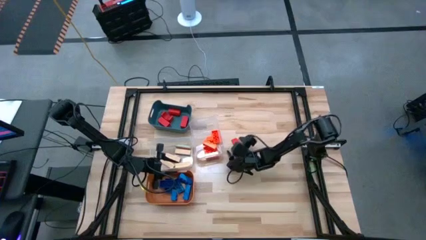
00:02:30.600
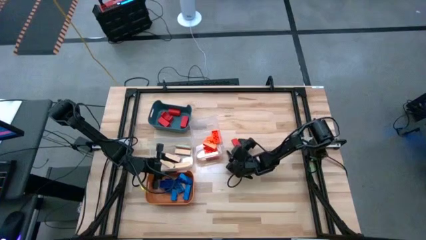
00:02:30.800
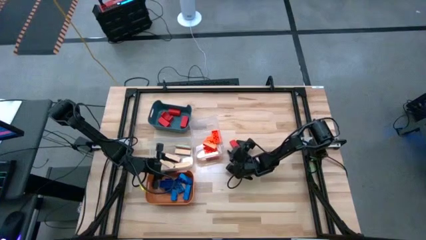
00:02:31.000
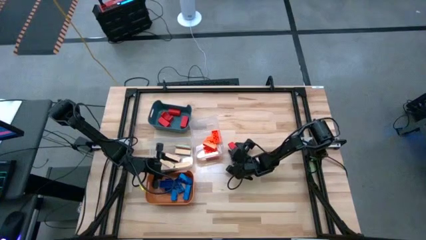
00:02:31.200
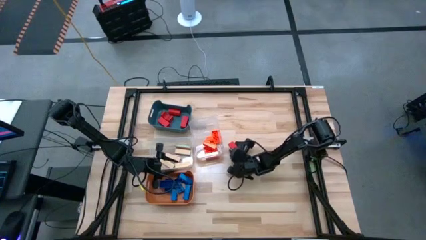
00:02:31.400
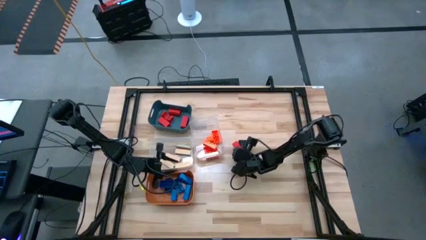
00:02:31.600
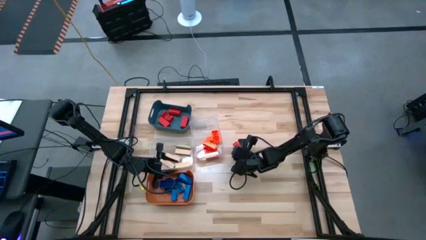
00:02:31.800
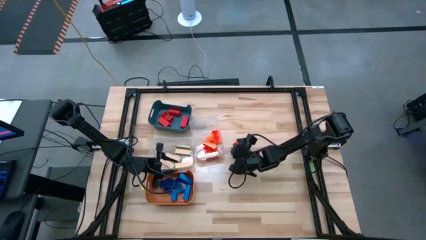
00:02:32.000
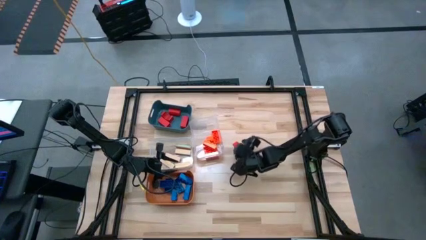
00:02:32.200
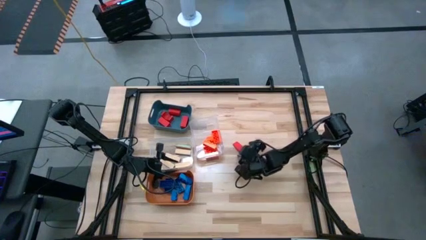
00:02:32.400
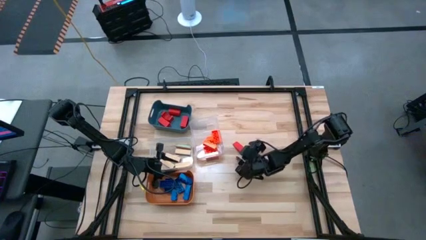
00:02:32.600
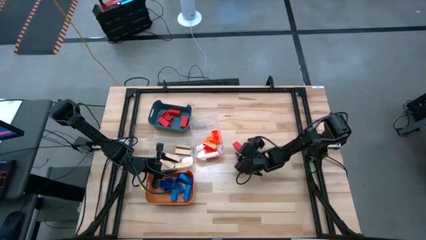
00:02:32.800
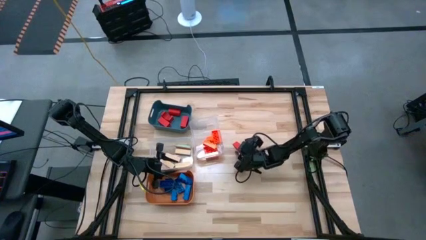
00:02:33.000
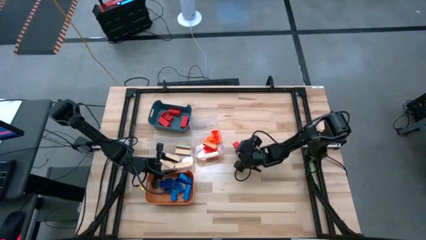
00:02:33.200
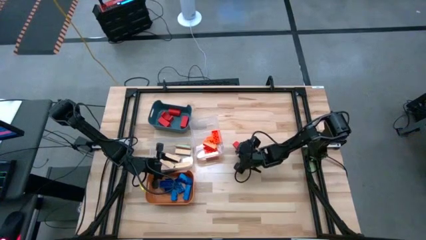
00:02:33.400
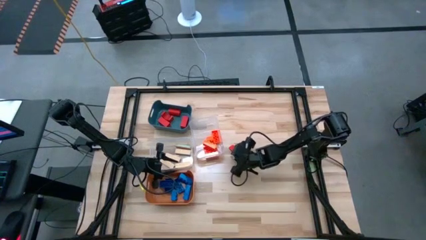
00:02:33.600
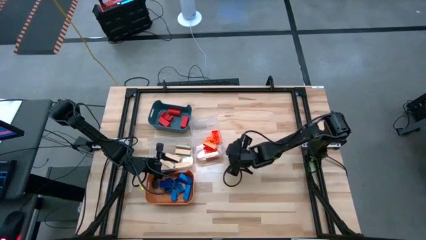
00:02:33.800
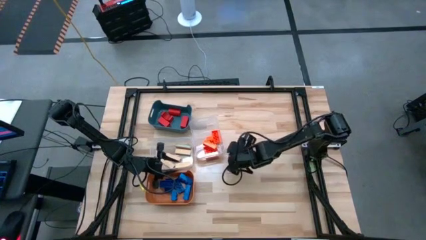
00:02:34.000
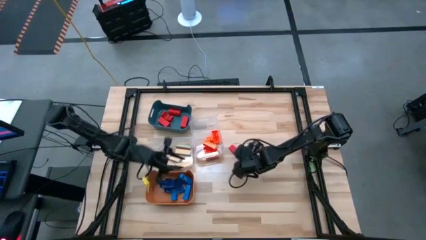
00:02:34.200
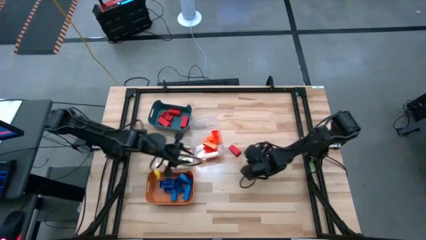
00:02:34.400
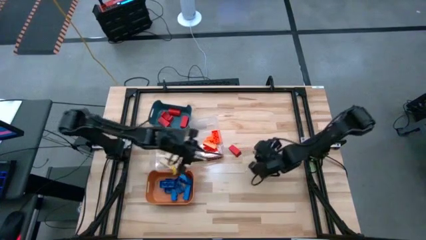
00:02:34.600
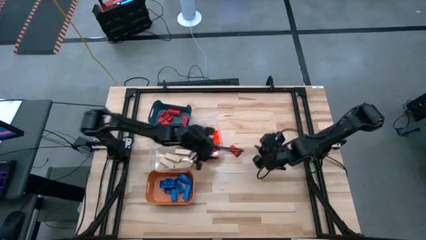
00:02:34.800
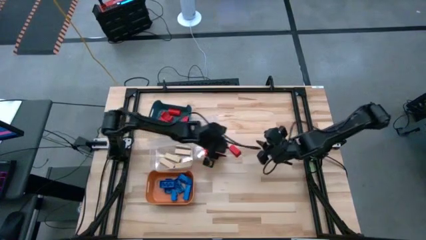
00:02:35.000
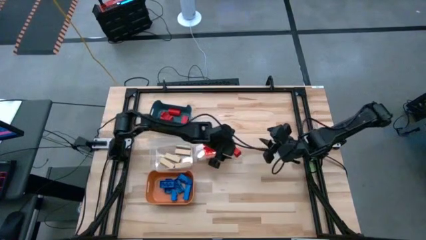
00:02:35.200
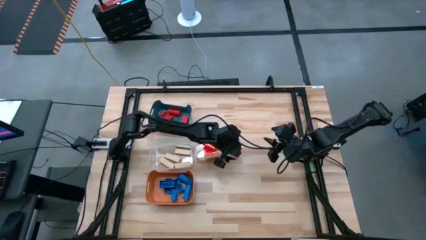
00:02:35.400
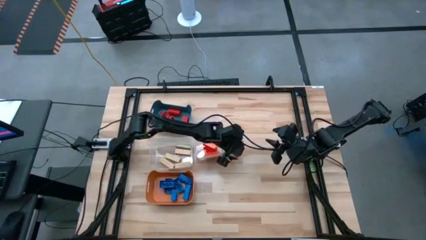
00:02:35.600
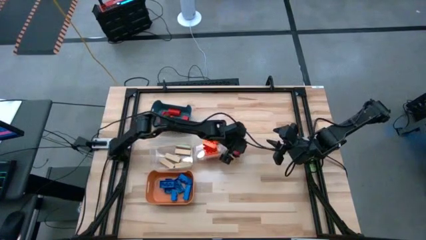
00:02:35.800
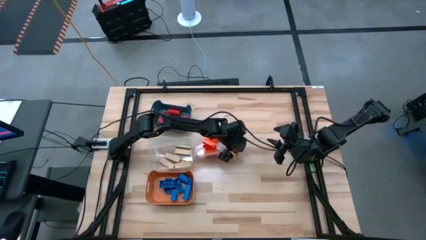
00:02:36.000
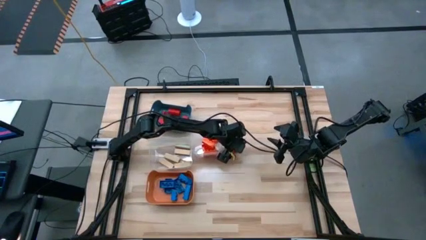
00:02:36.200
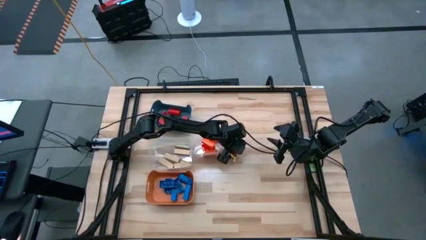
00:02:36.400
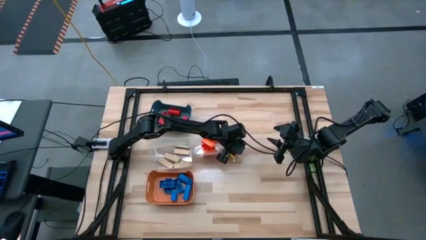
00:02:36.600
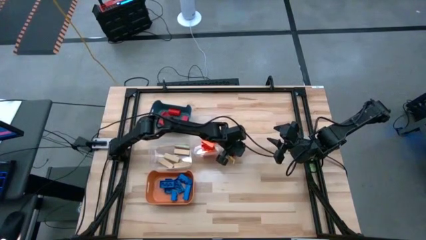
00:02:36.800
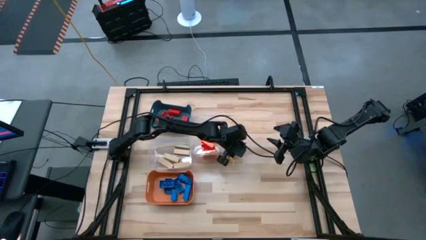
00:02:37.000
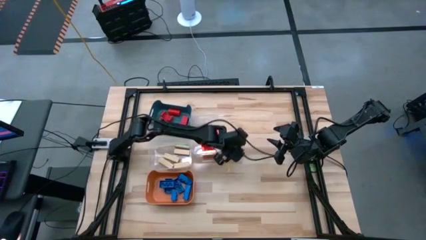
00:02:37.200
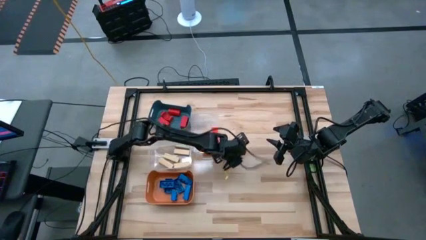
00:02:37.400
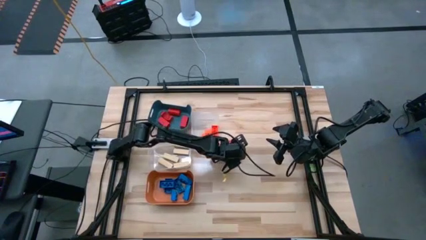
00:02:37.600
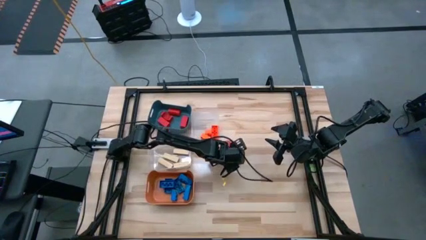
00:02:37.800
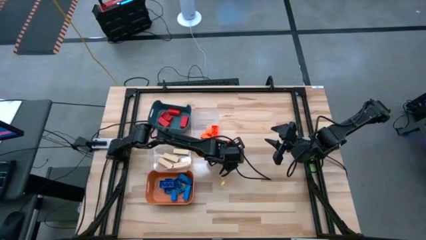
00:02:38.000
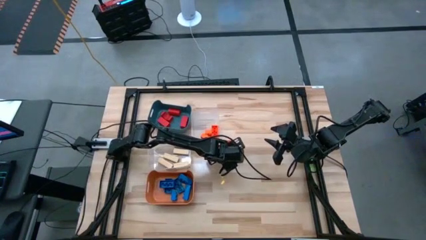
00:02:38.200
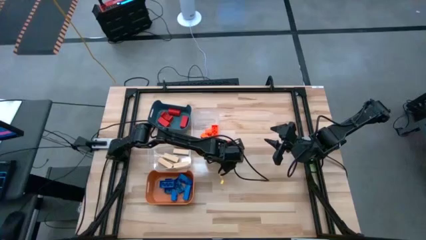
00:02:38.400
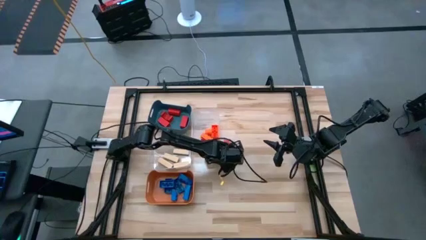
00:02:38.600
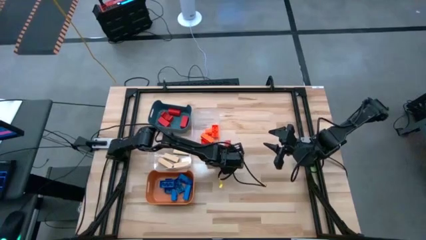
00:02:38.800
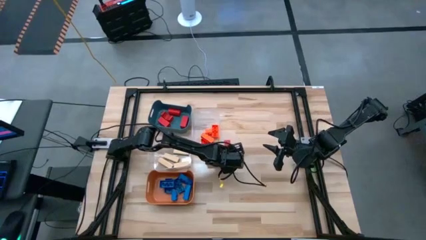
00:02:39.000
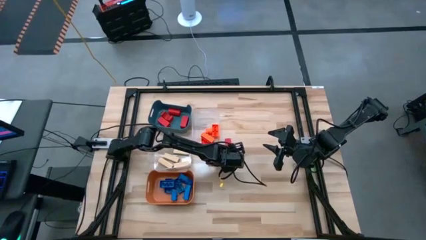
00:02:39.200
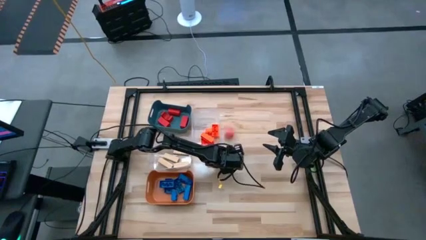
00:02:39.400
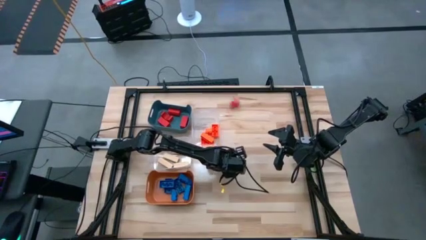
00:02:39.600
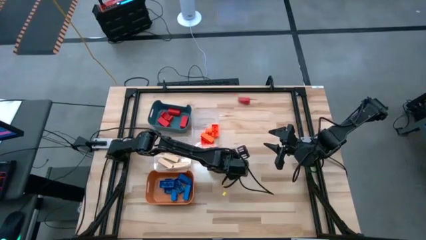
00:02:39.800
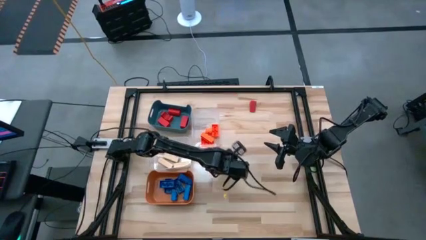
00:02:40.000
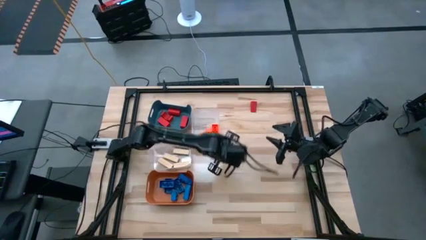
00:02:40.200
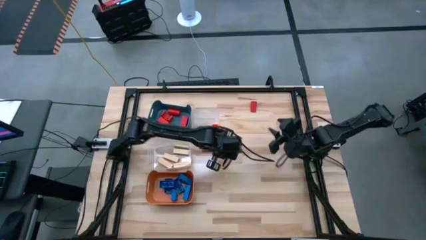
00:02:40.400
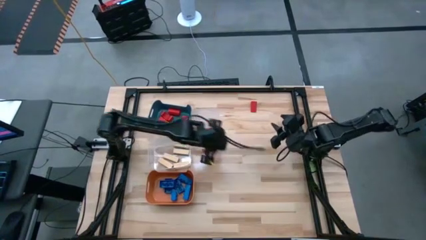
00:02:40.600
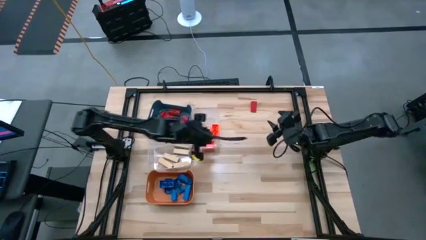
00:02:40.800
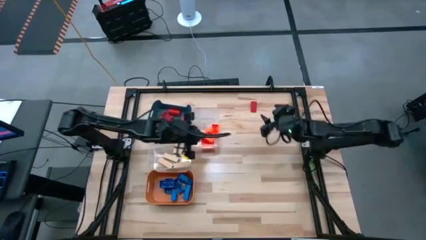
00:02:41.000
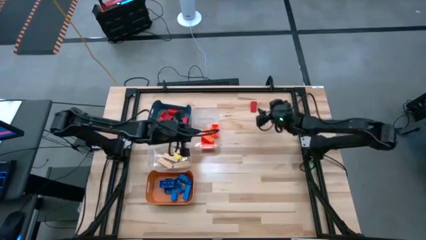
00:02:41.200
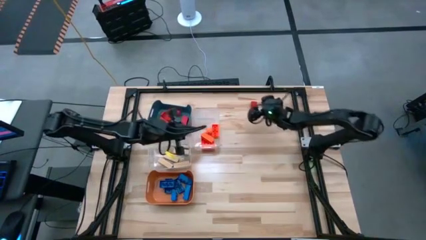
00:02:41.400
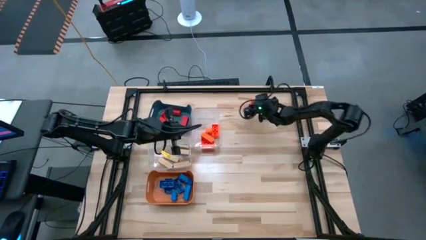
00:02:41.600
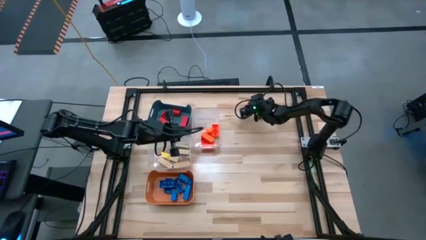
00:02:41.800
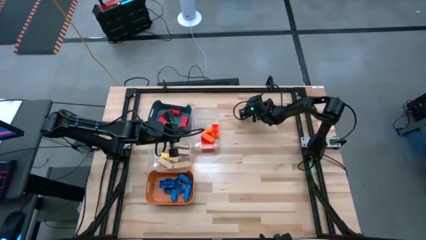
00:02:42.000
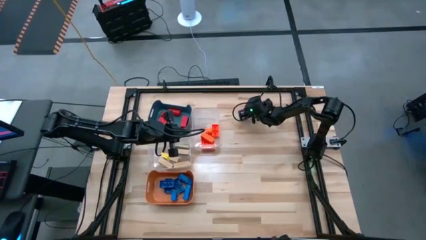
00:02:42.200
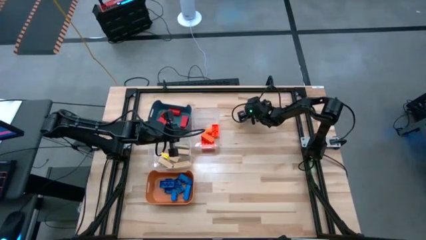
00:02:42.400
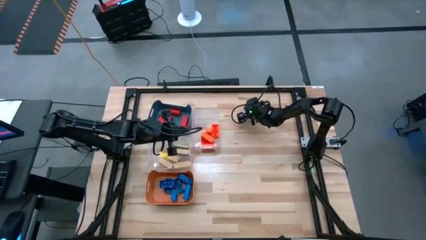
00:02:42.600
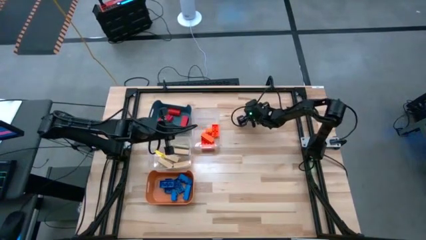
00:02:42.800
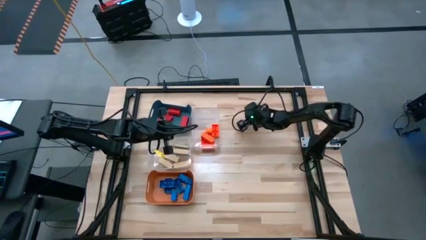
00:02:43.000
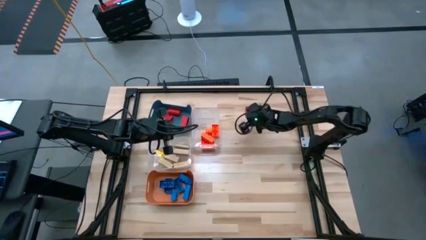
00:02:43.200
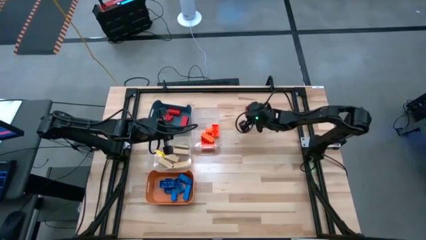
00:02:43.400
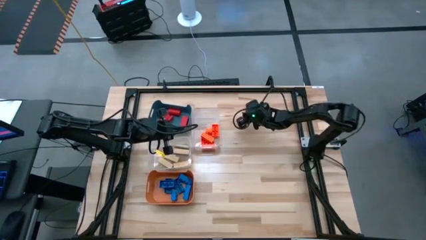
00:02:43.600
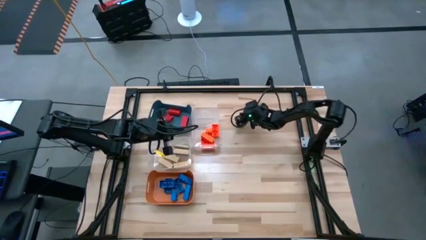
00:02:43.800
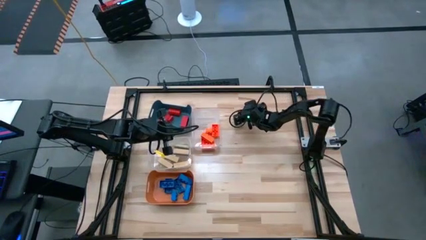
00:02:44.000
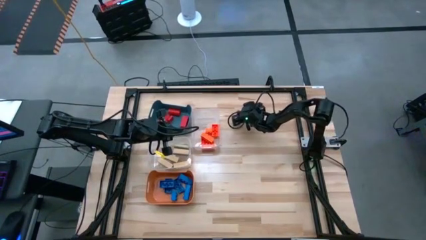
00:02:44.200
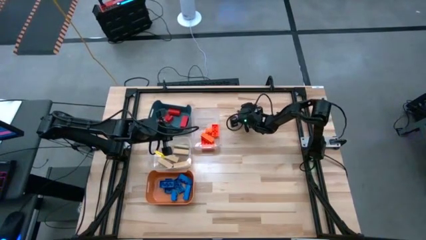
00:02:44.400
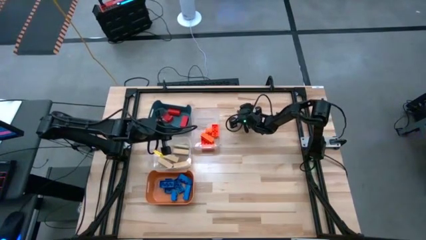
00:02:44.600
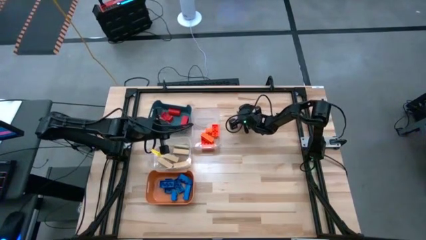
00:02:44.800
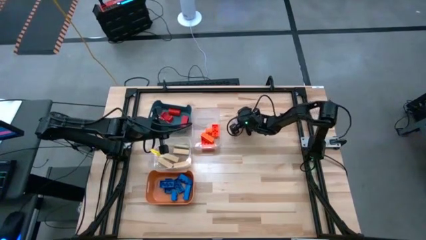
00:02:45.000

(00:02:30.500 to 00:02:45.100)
Task: Sort blocks
Put the red block into the blue bin

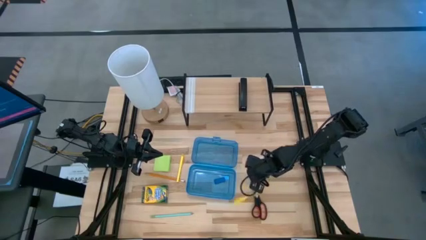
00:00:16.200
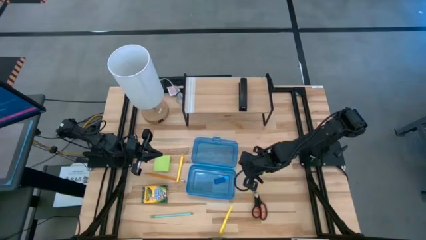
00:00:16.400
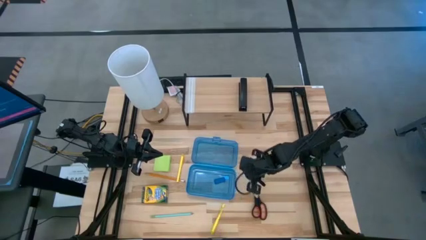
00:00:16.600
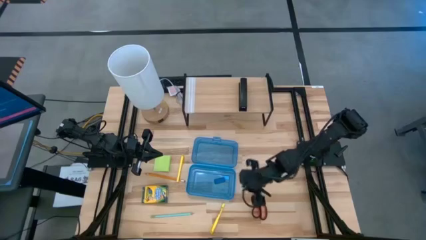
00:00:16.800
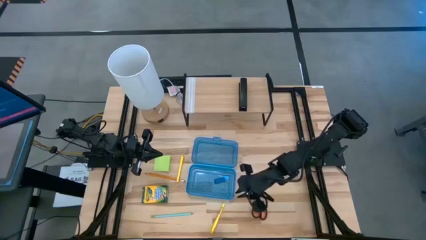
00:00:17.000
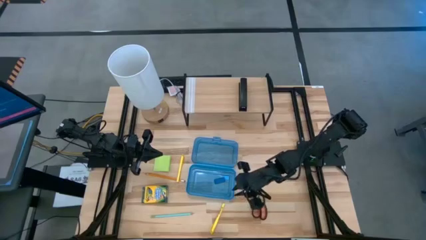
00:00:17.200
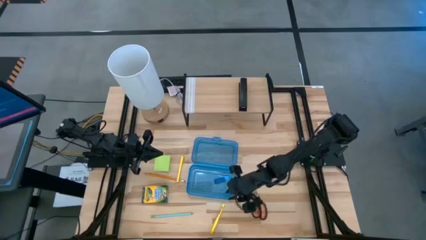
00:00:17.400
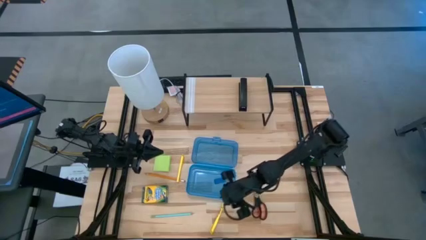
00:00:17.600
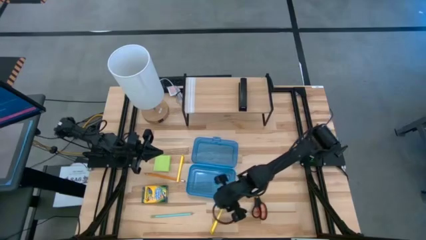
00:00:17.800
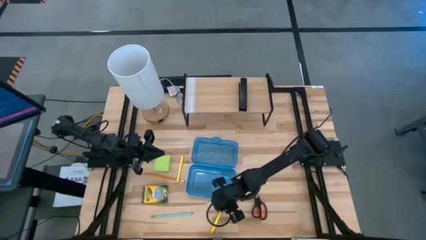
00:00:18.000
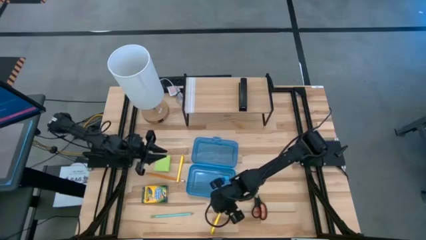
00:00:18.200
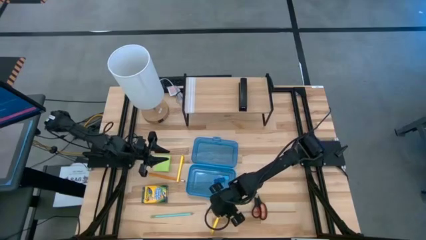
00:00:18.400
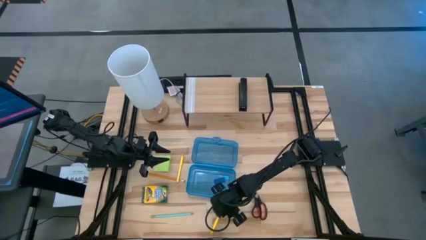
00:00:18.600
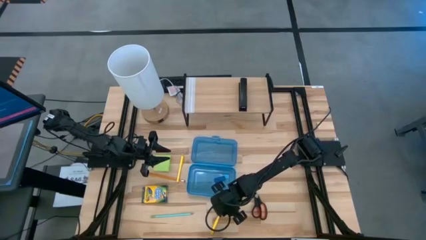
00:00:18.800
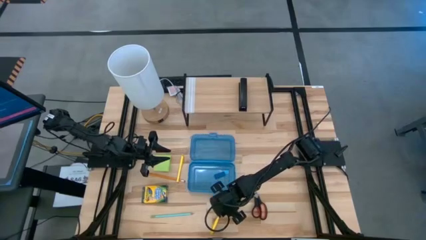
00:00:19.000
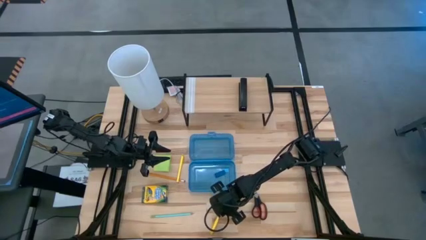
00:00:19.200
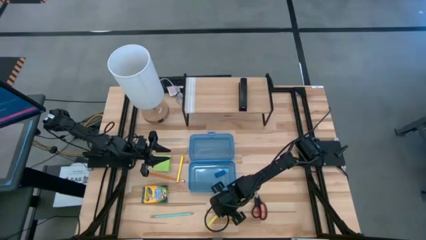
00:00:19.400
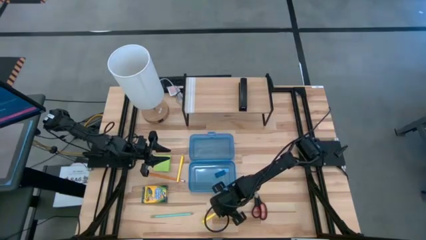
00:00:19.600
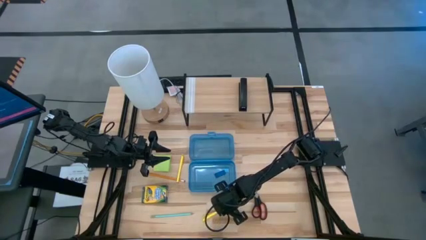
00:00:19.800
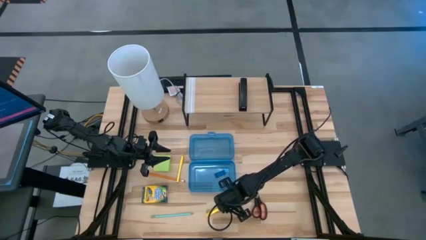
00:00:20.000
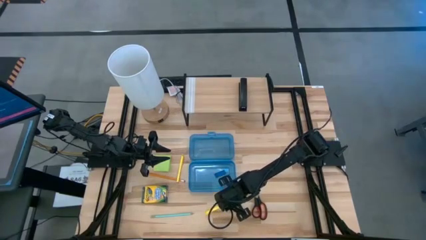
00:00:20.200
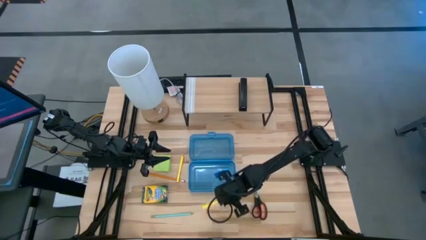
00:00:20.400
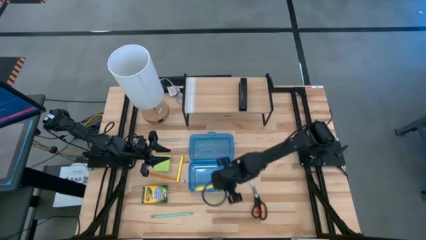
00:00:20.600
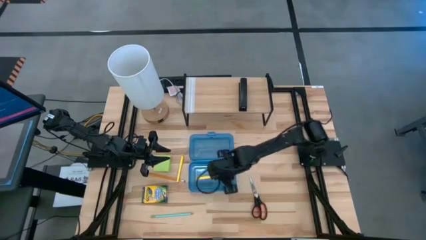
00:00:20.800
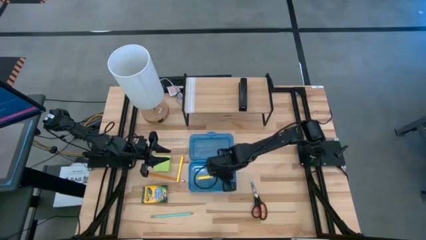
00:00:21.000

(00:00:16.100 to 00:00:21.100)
Task: Pack school essentials
Put the yellow pen into the blue supply box
